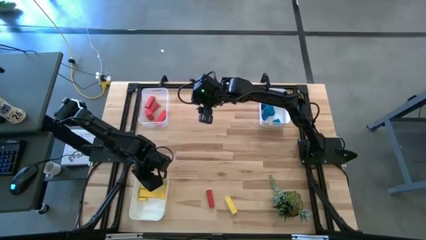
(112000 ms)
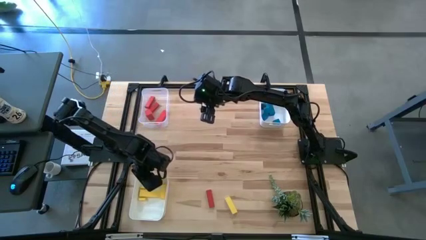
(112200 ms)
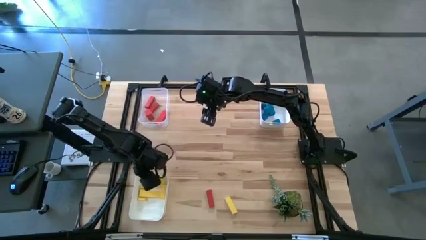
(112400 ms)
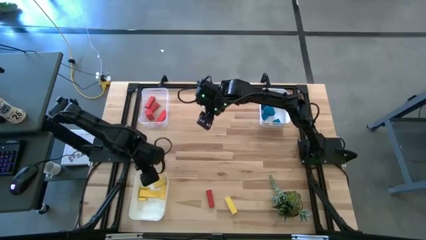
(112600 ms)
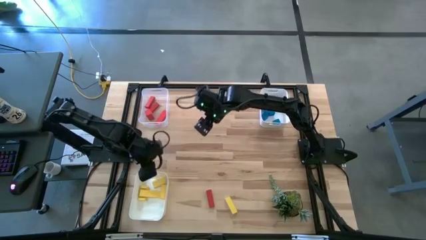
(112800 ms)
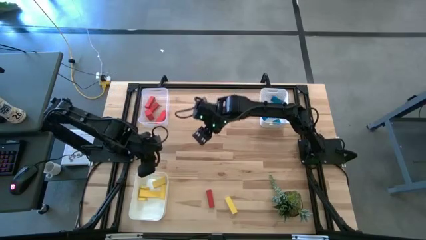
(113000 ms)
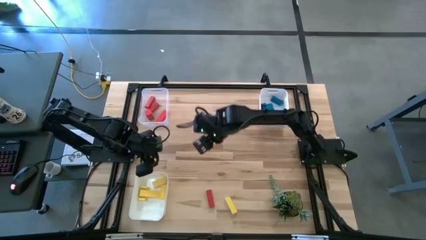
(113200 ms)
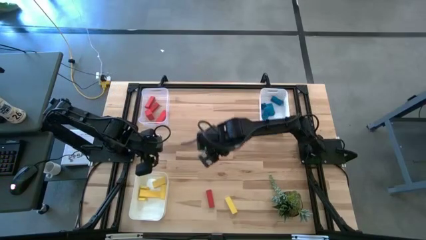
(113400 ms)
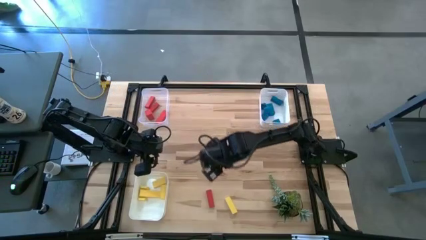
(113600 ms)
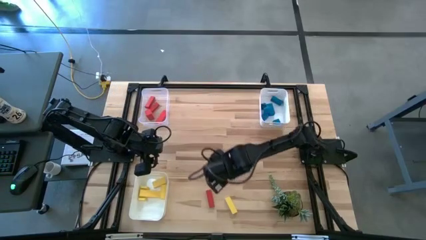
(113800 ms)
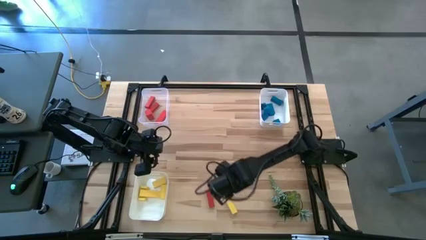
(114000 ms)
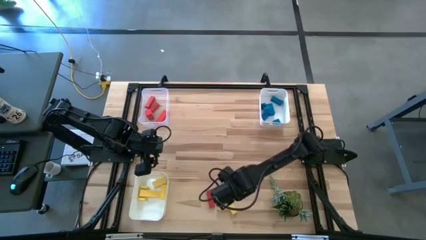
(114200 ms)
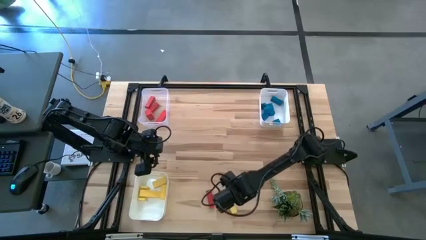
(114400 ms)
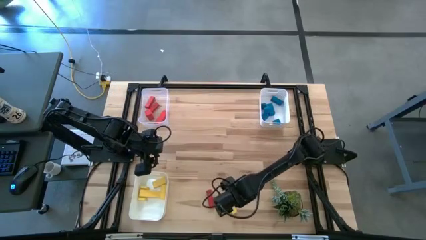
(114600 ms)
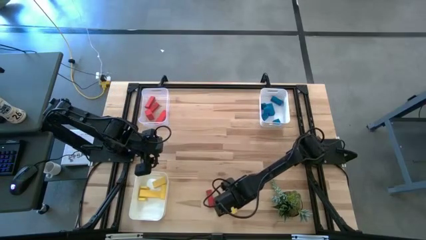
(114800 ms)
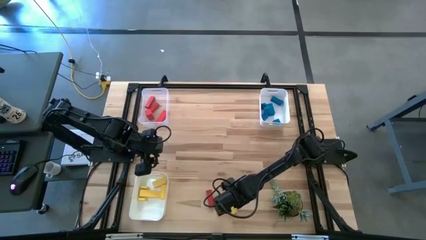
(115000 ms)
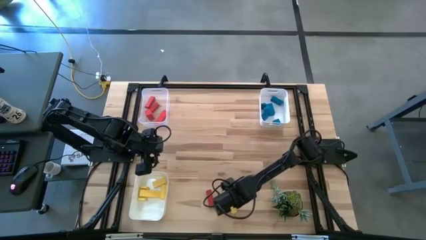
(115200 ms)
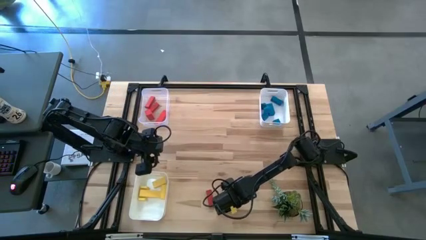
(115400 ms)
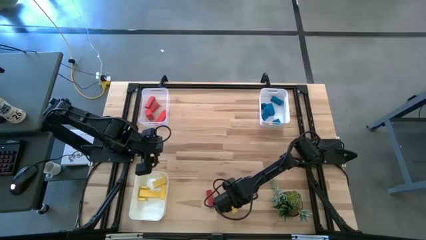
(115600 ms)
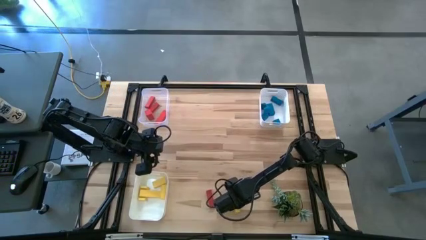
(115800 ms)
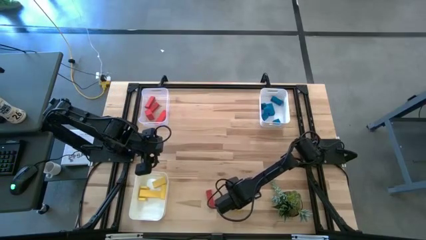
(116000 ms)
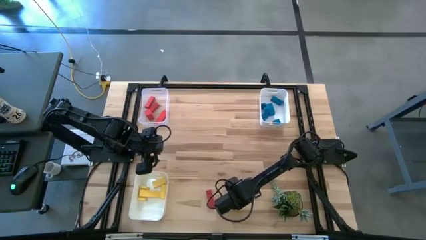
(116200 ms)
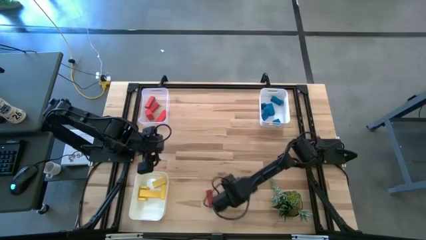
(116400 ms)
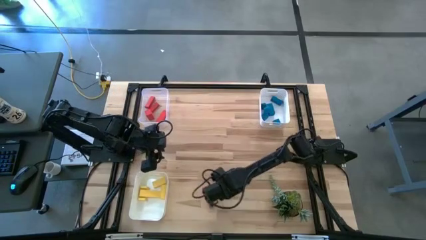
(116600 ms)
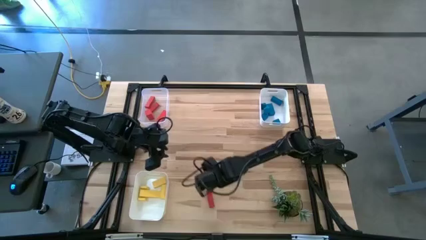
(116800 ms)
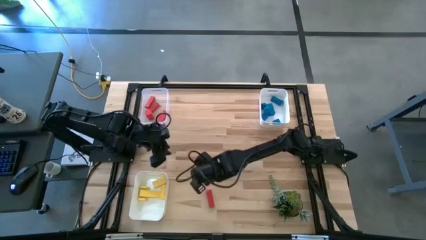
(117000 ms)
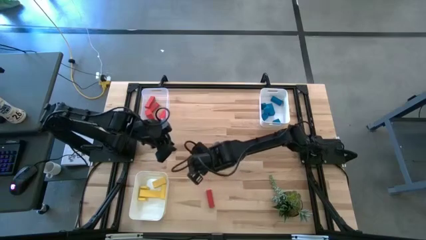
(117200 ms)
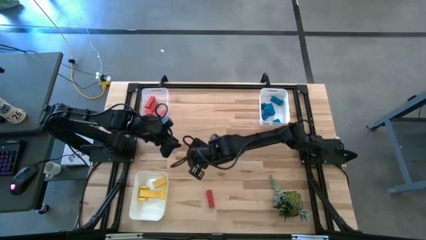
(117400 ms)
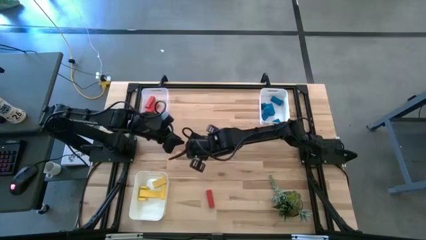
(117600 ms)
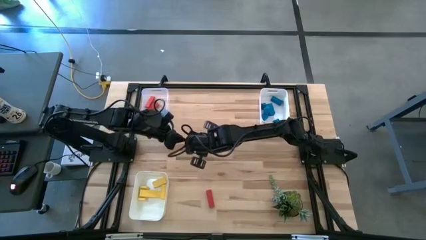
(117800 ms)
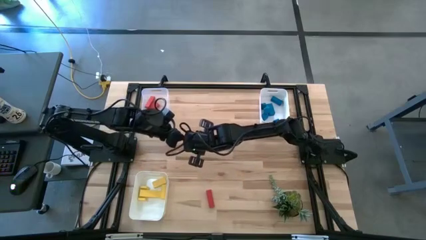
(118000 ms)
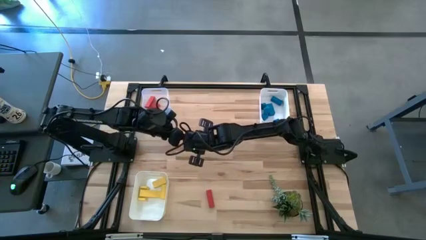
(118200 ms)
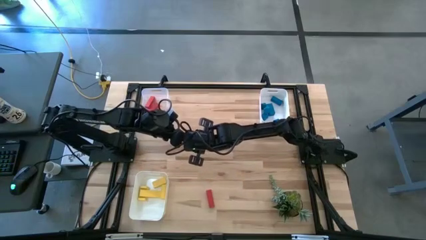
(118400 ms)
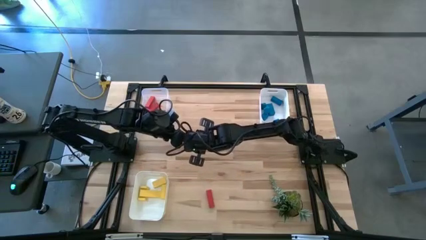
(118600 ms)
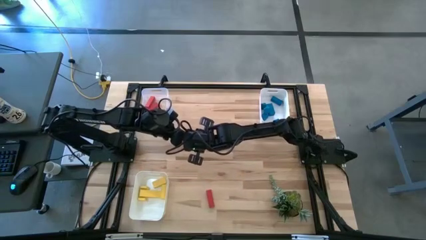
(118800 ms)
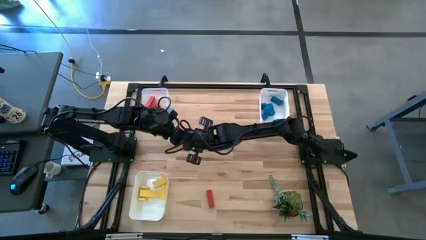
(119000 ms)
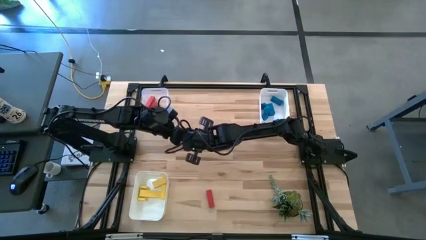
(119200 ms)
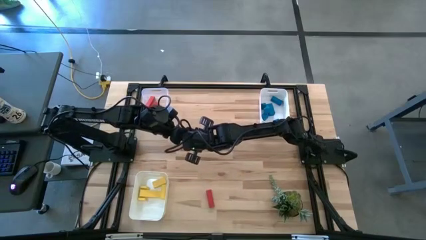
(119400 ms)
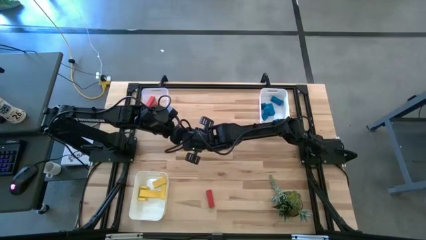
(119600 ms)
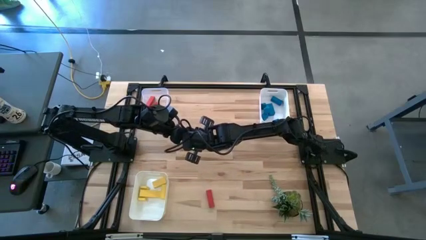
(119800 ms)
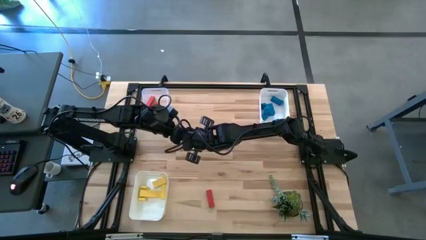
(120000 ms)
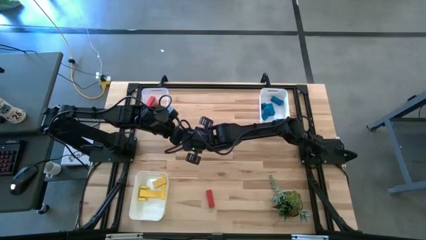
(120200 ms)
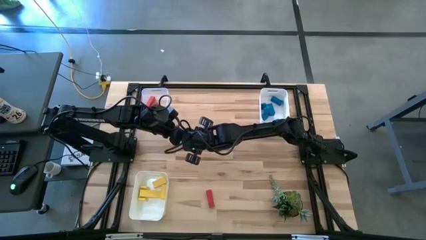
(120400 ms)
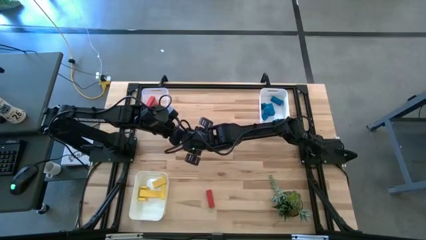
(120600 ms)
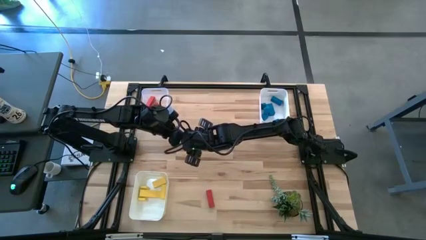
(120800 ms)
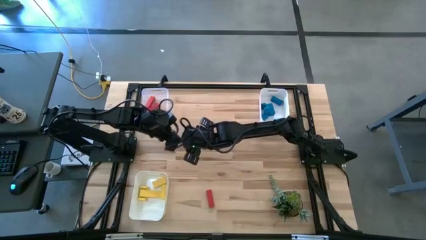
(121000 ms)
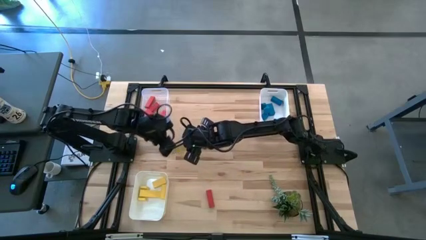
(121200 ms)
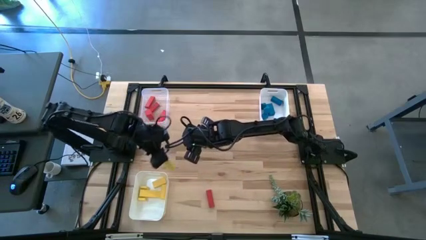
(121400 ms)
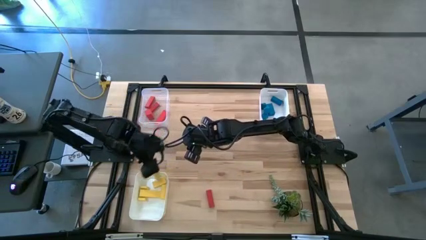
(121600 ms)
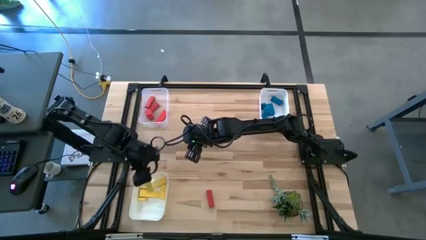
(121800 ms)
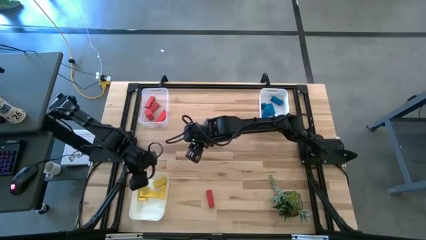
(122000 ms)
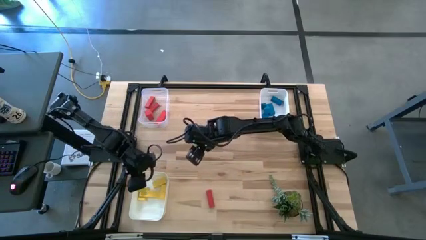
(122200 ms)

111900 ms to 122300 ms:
Task: Sort & place blocks by color
Put the yellow block into the bottom white bin

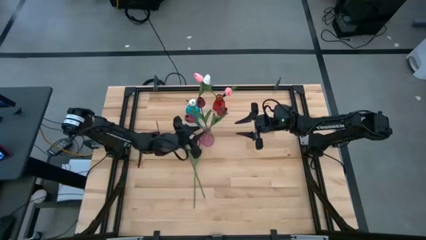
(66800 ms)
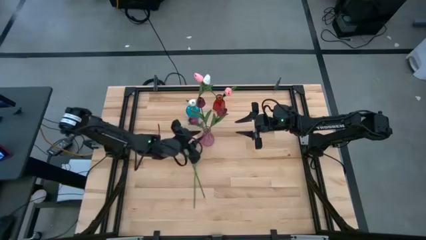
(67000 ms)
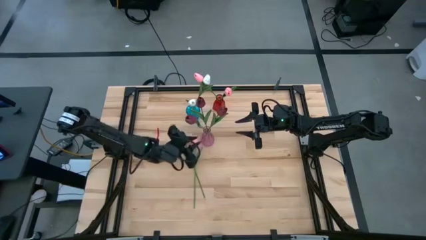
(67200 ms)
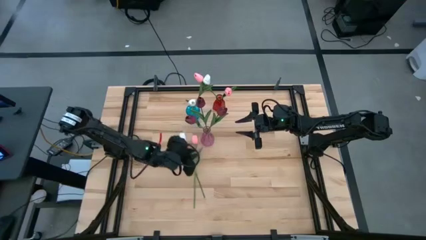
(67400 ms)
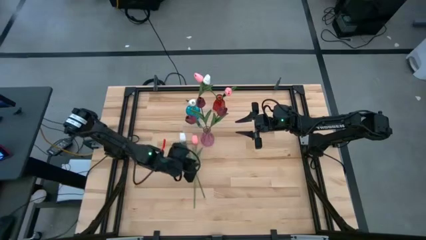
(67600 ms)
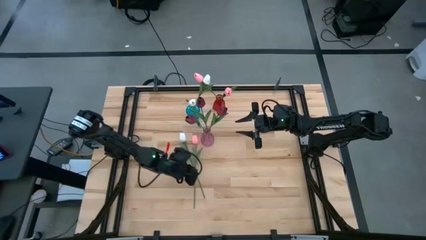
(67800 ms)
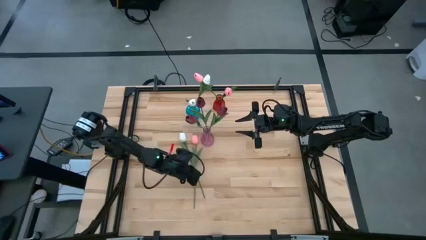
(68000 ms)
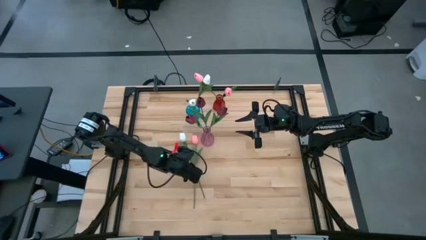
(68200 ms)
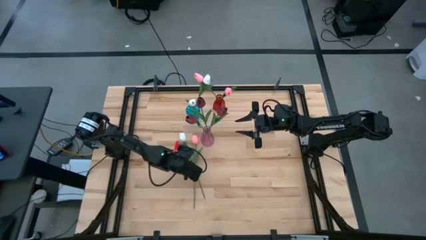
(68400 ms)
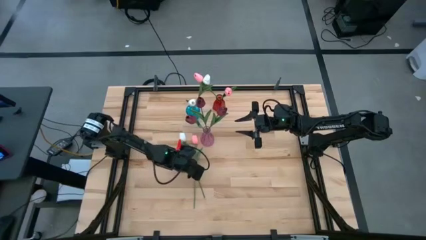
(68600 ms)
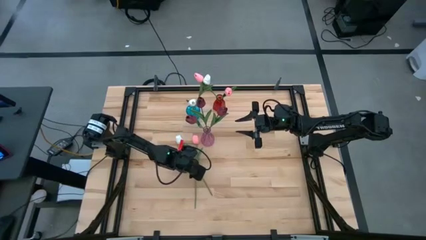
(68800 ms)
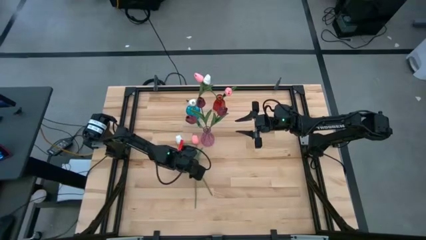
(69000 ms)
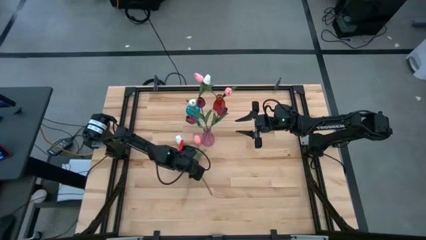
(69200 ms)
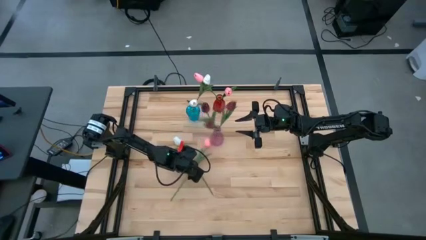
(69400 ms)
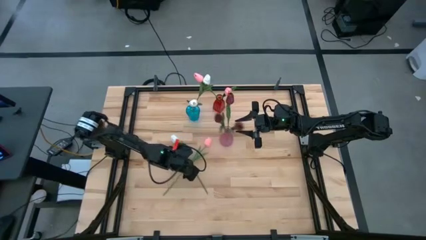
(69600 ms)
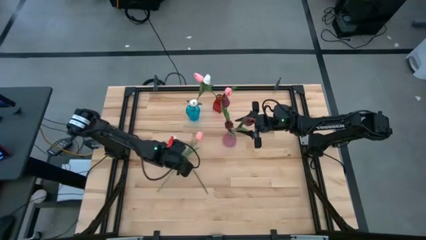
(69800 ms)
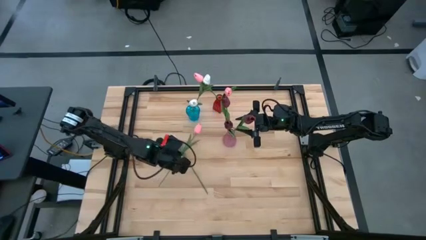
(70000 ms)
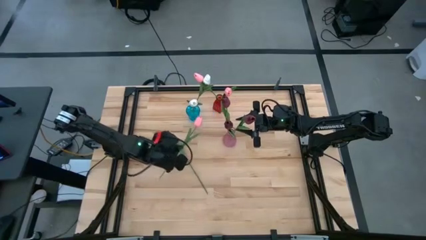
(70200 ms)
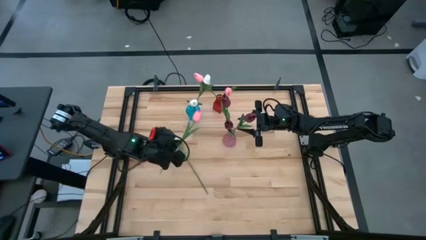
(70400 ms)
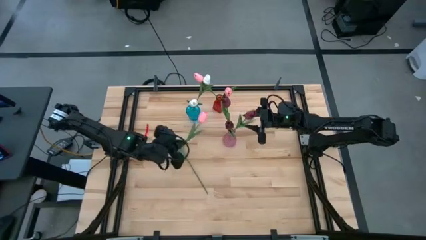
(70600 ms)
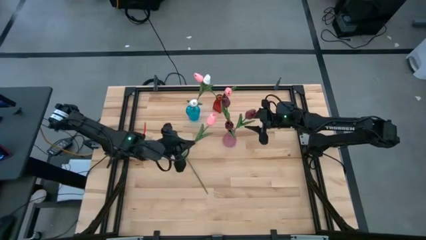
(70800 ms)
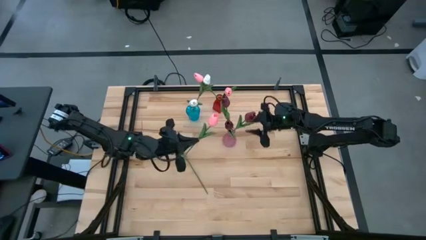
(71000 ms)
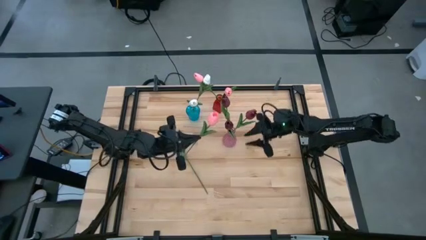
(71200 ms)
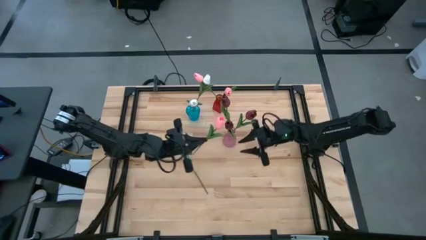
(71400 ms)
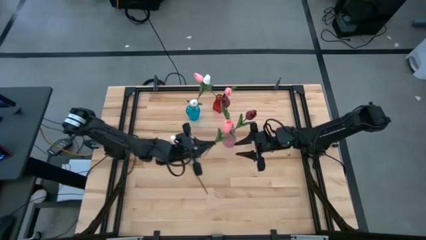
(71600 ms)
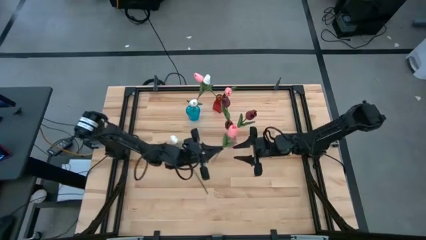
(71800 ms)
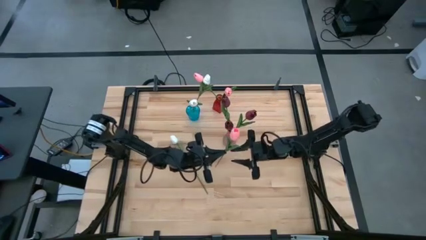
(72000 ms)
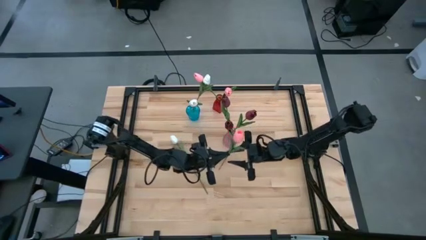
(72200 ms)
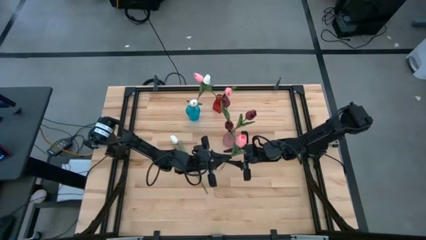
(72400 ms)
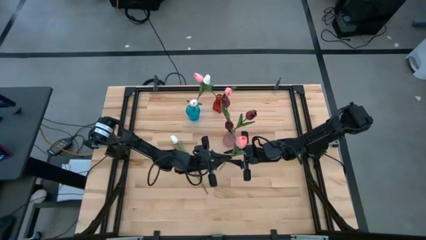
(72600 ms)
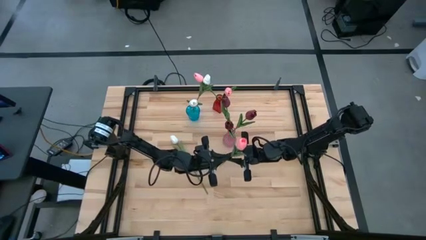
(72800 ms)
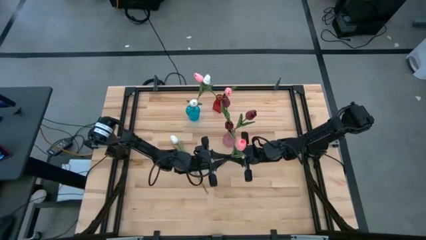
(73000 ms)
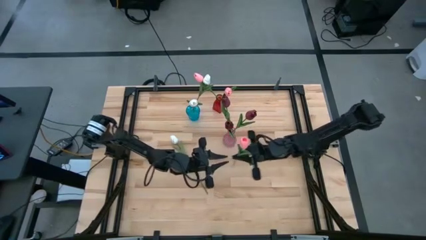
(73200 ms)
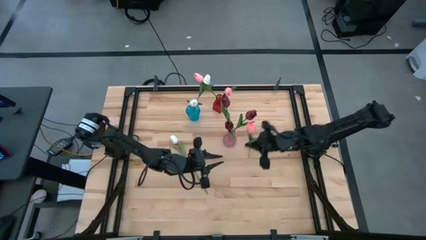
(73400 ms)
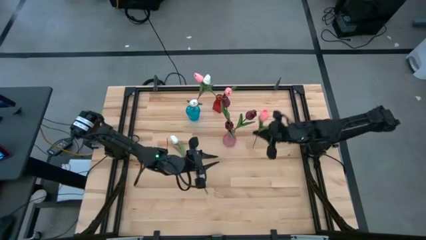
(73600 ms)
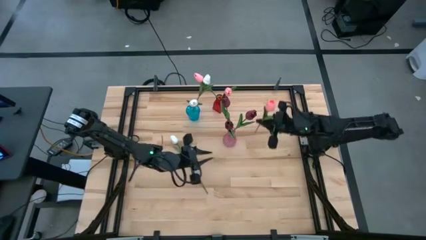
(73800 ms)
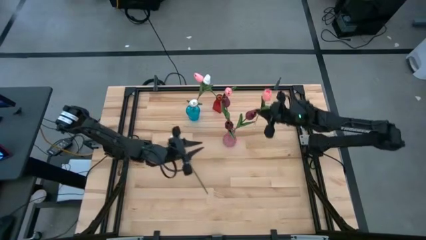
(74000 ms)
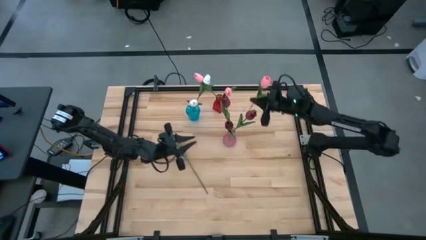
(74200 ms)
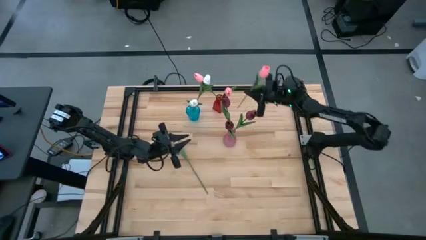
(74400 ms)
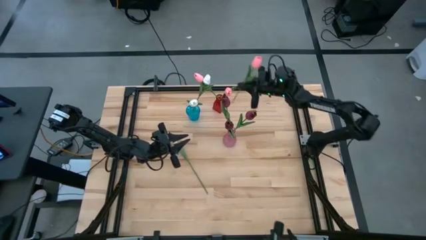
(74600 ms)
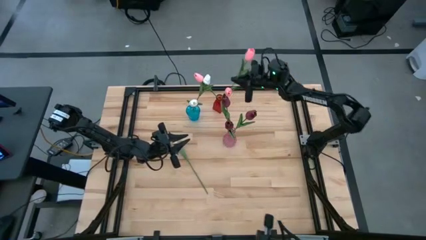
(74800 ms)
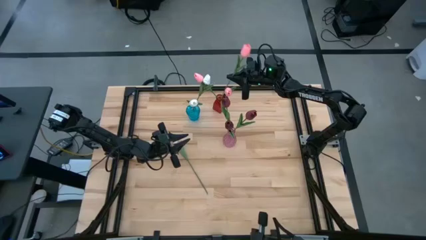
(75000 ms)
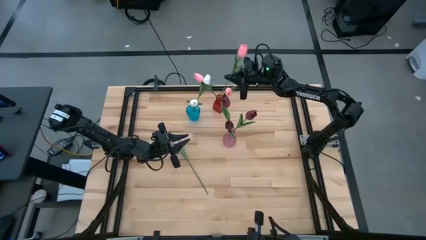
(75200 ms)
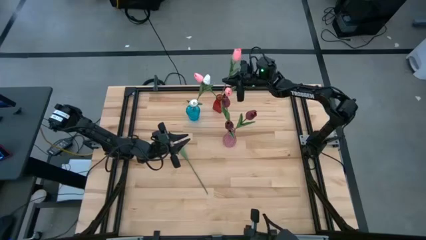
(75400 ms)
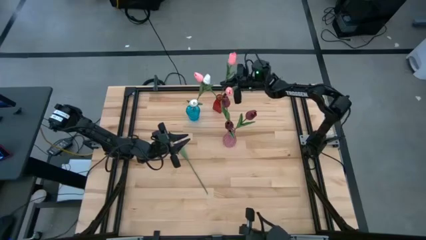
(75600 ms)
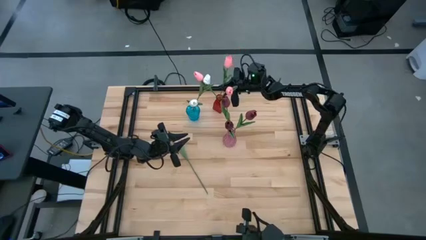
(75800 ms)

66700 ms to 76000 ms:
Task: Sort flowers into vase by color
Put the pink flower into the red vase
